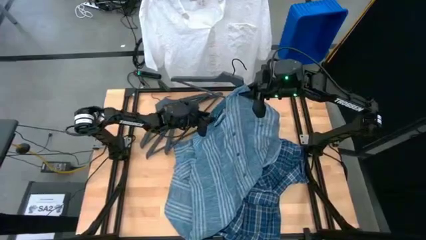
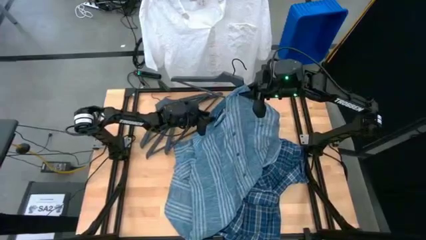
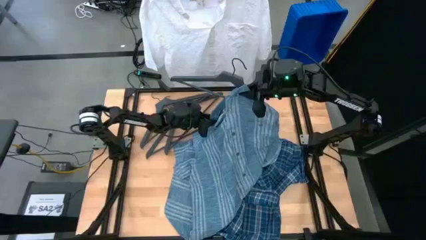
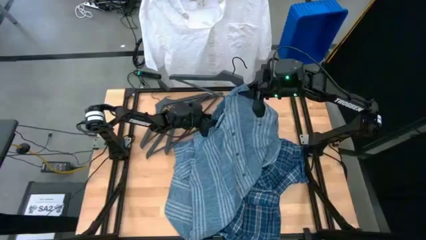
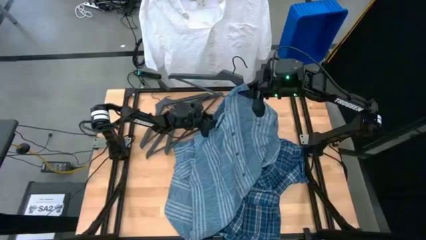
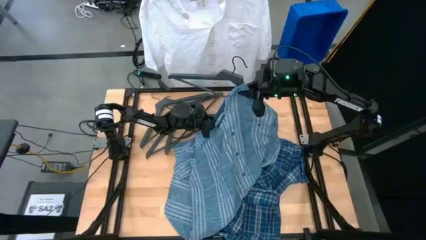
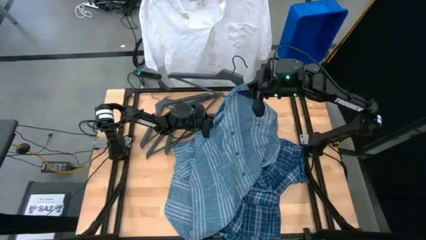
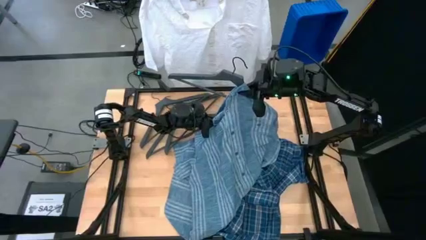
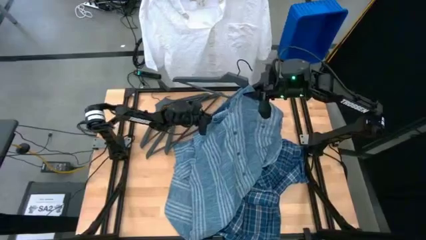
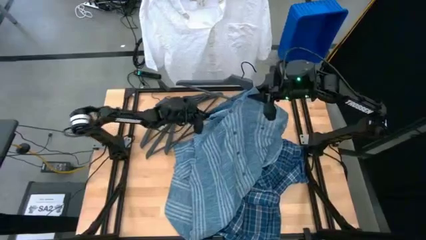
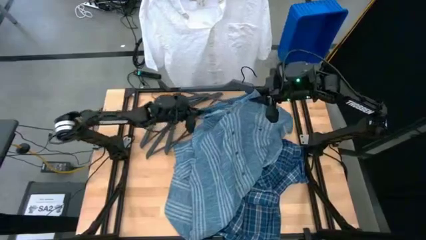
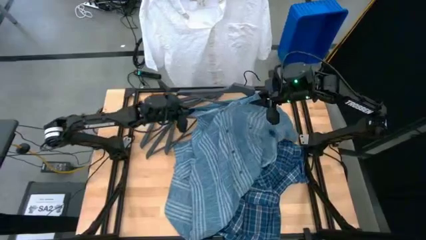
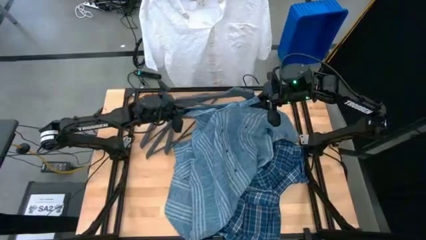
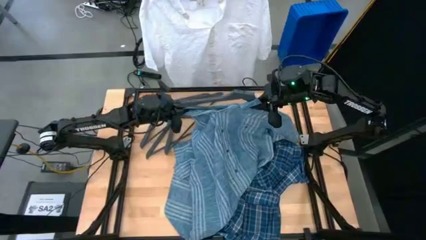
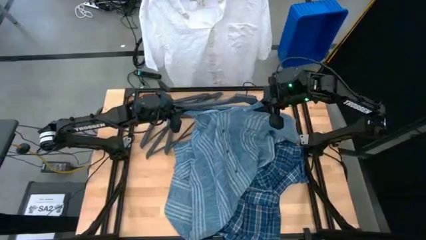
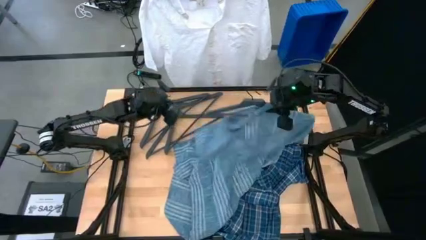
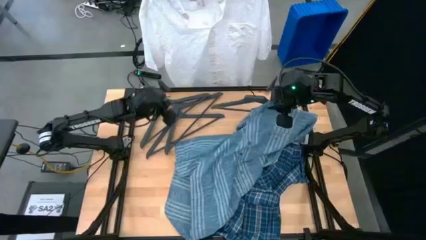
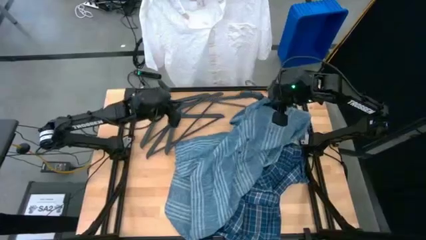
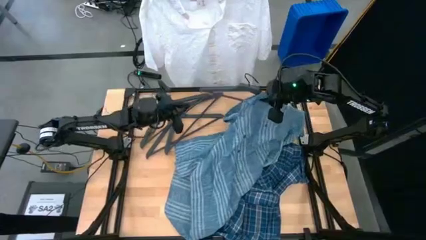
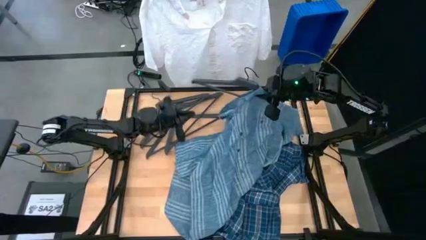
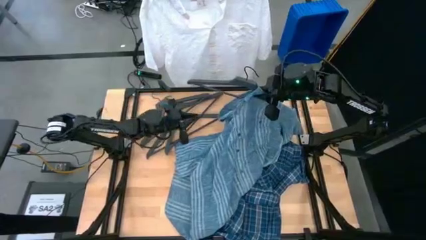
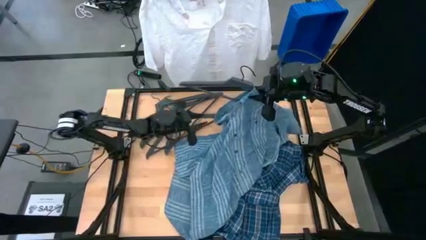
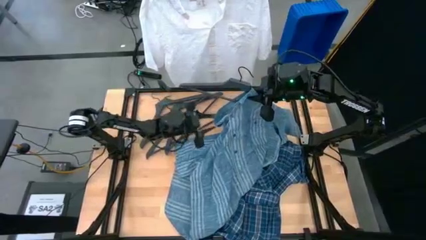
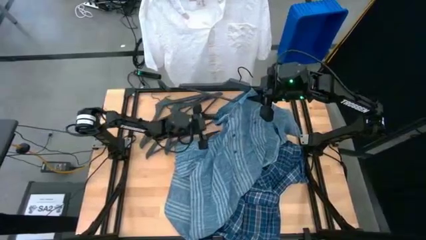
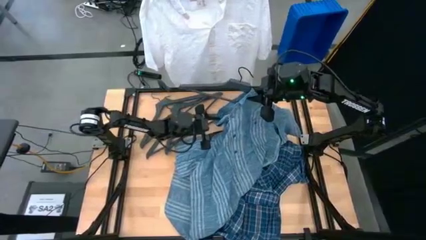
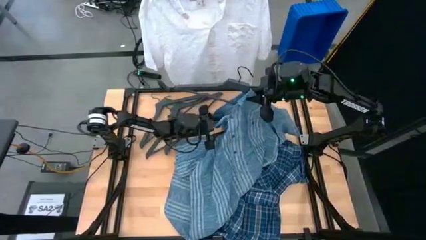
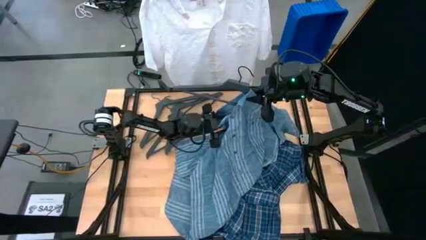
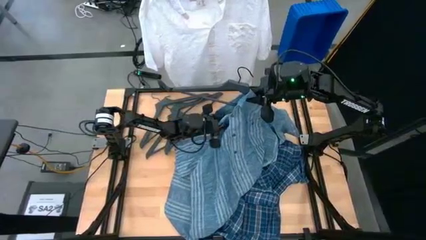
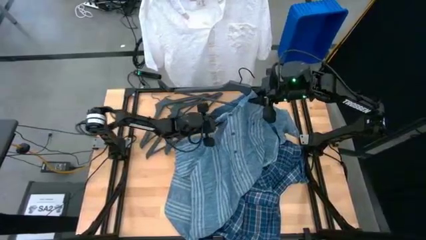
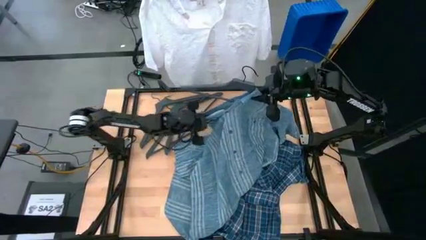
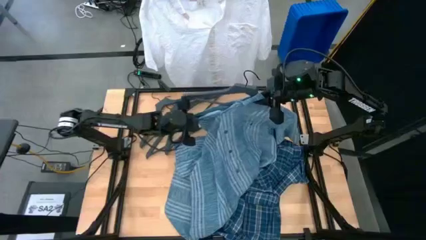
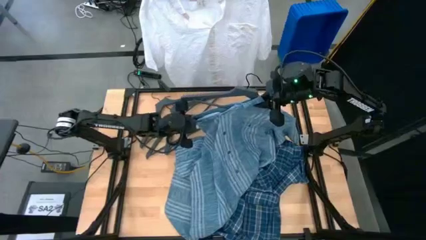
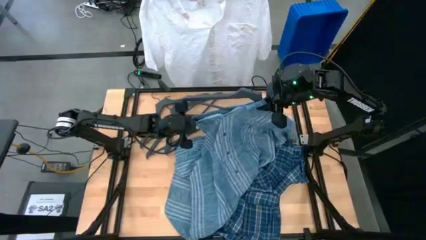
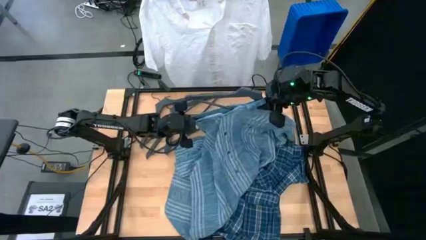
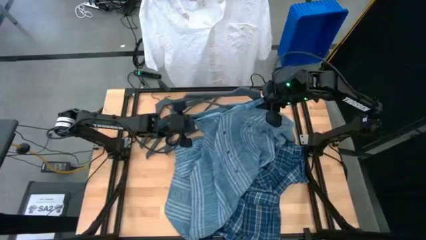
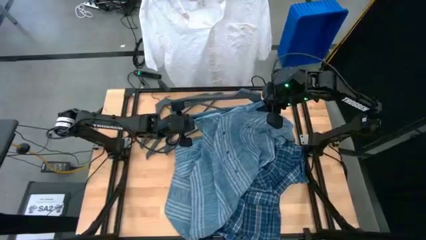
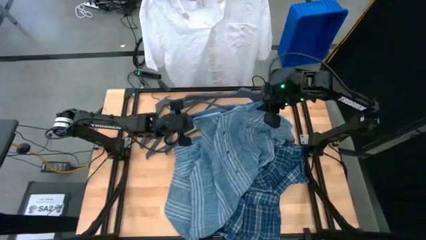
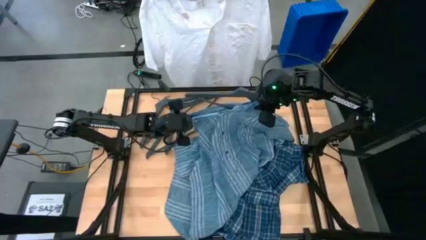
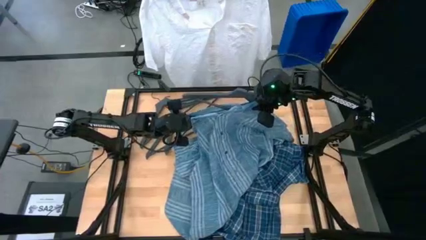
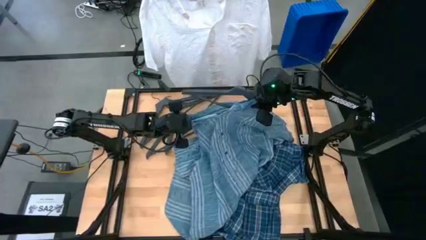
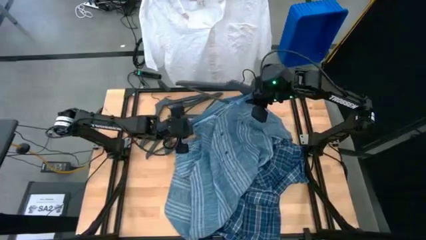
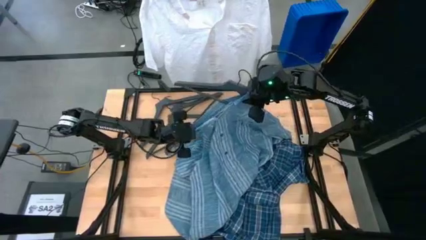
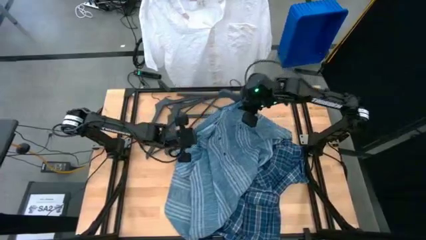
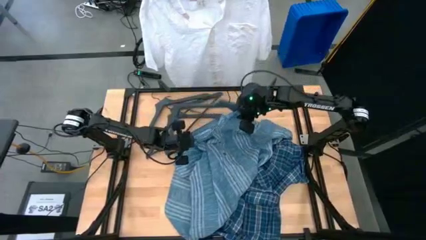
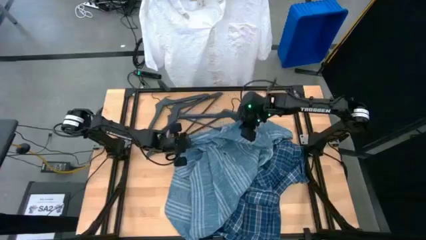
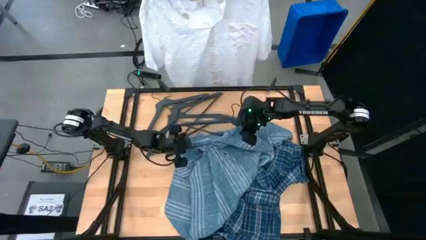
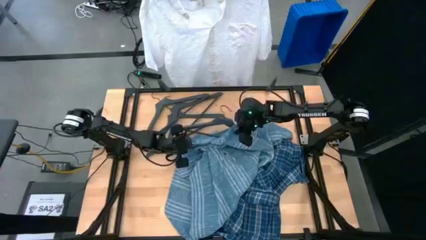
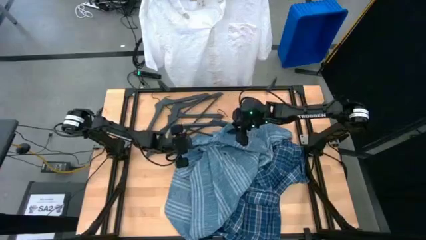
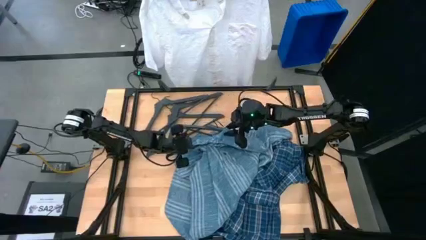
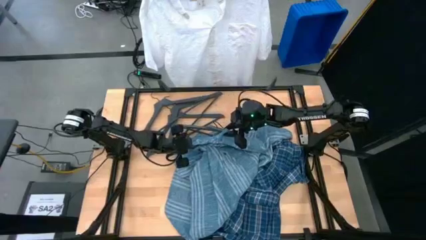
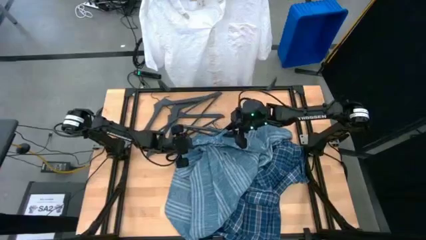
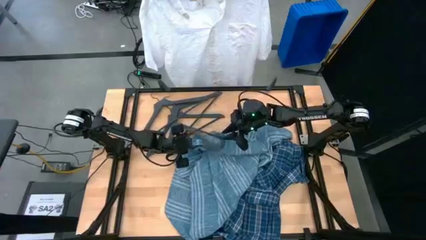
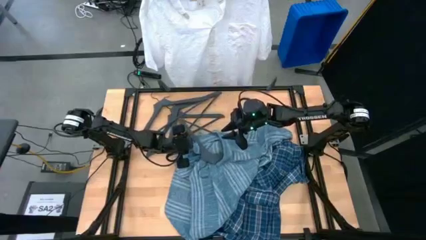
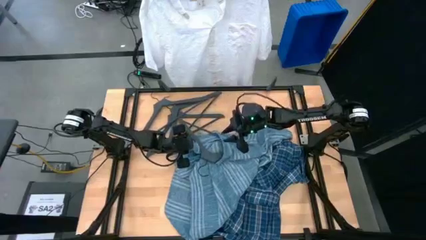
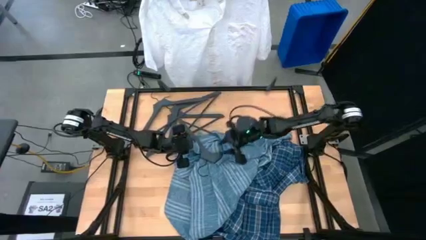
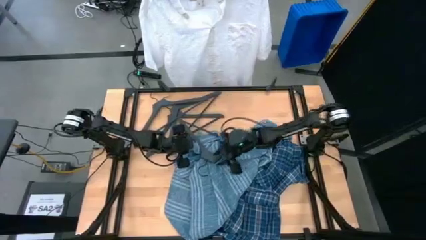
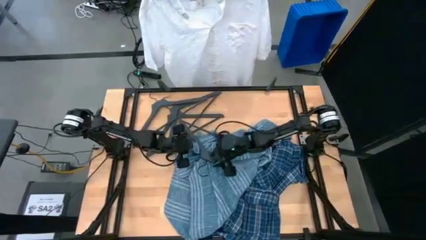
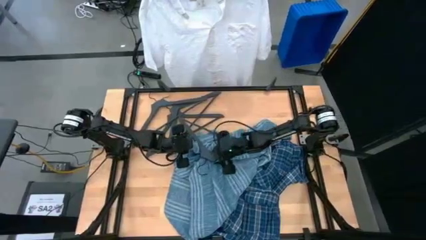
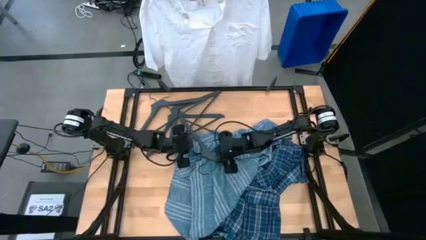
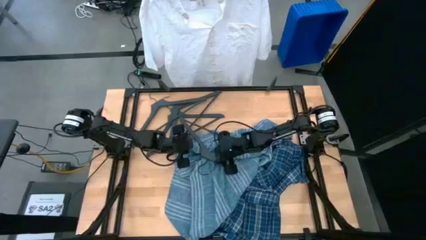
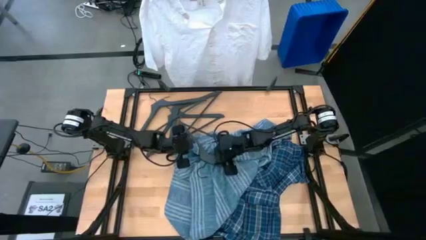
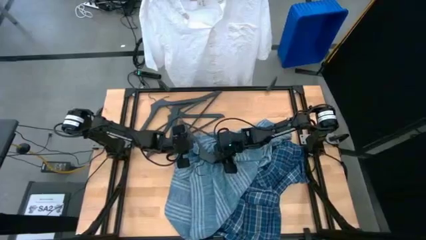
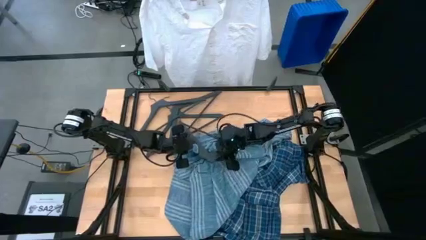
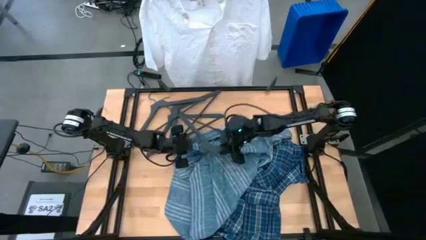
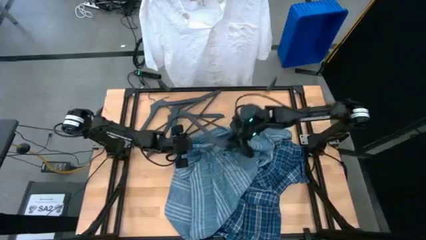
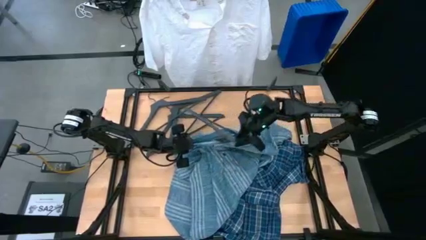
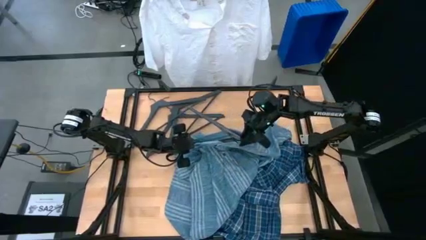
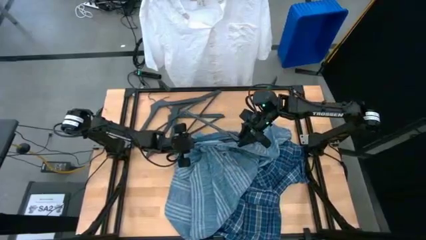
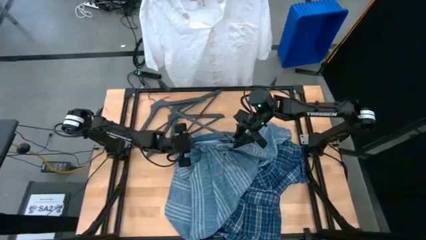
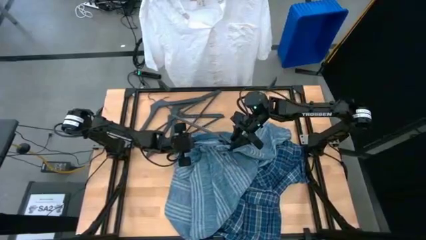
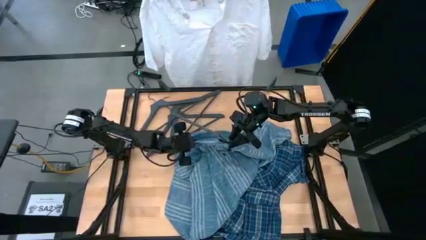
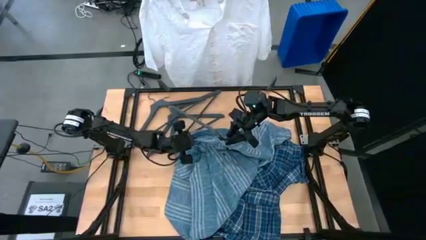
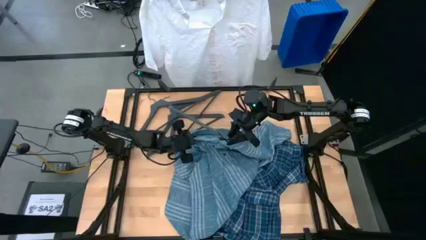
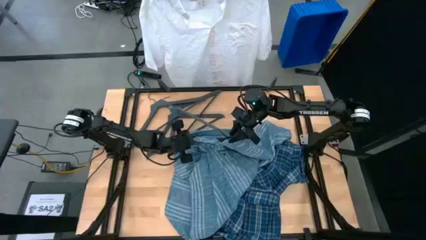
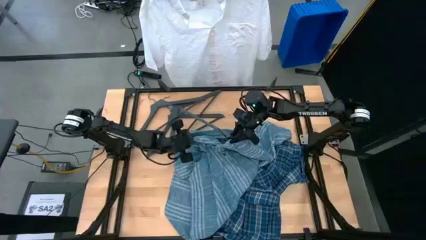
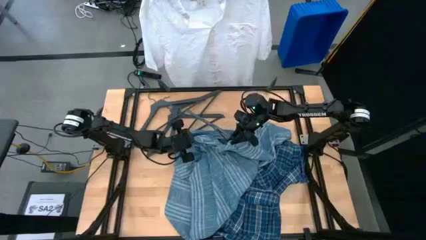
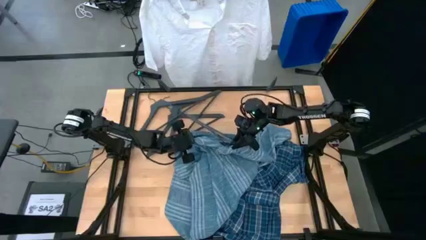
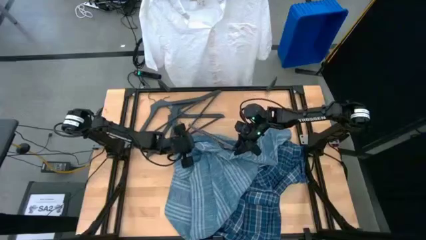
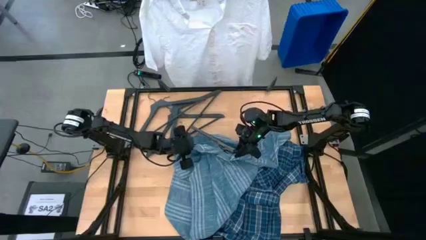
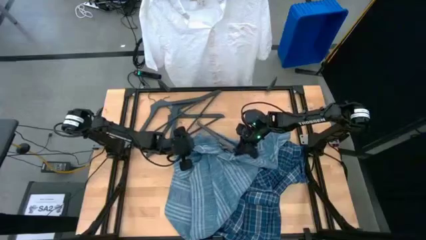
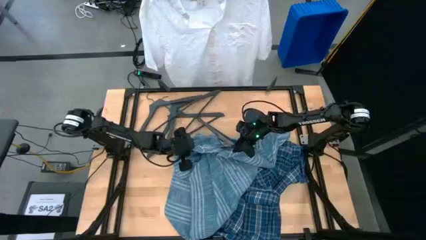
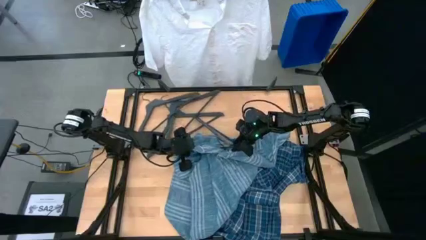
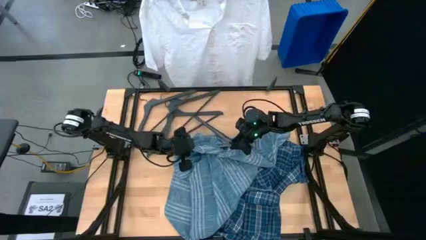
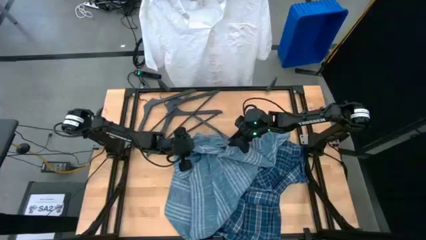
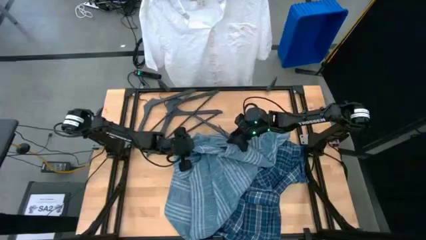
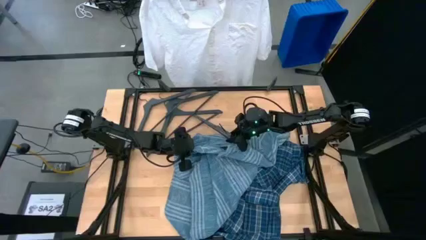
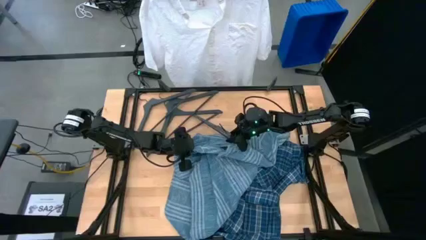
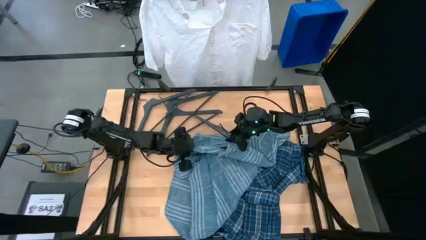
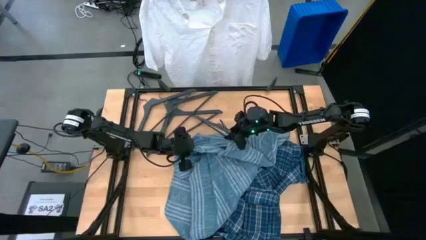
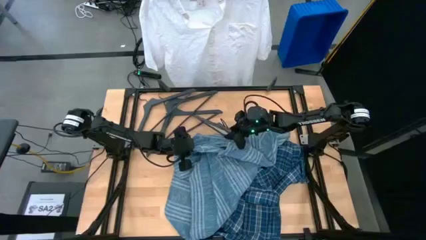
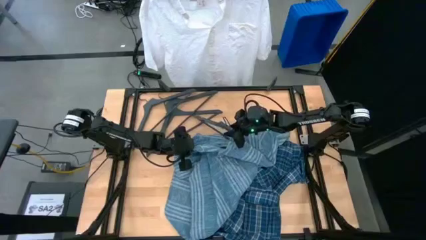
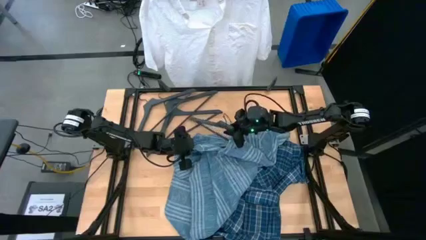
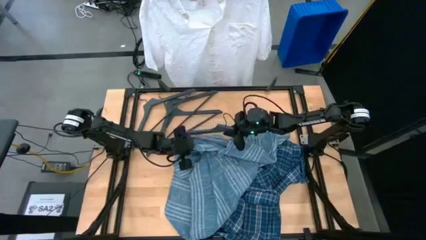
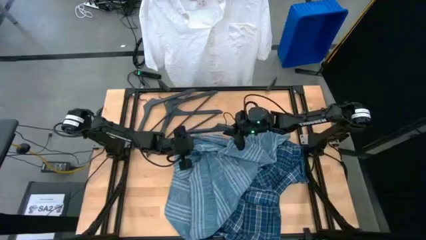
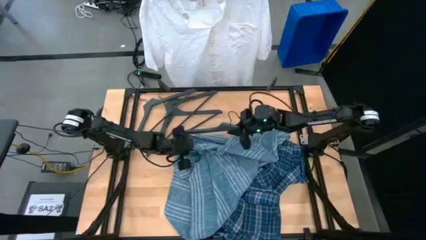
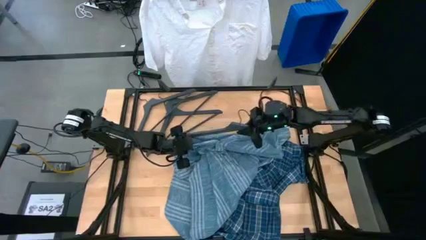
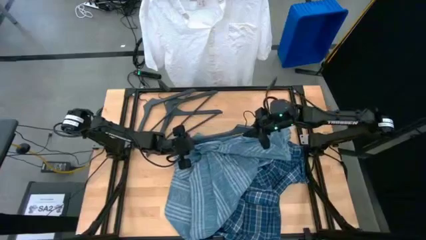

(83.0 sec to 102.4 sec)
Task: Hang clothes
Insert the black hanger into the green shirt
